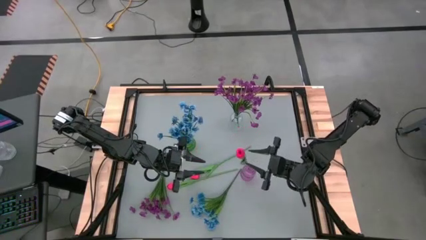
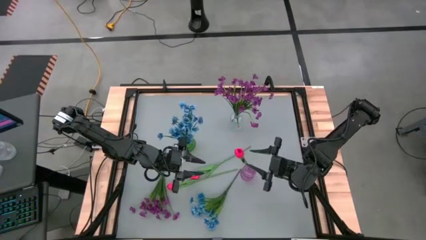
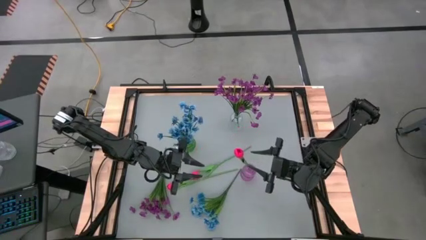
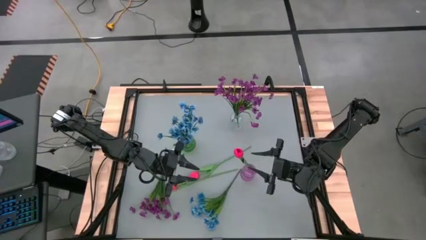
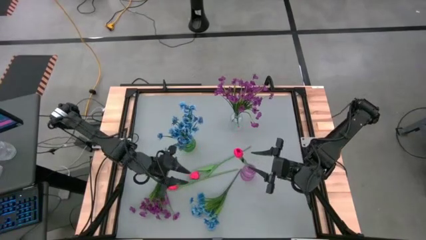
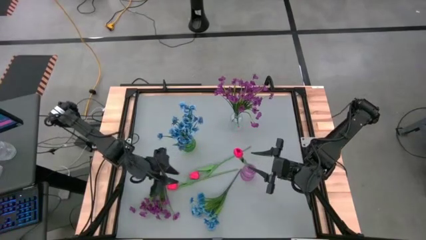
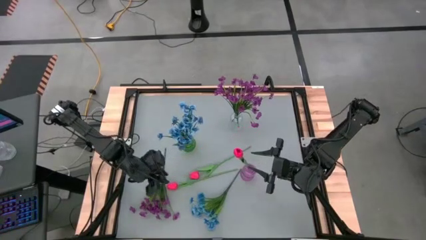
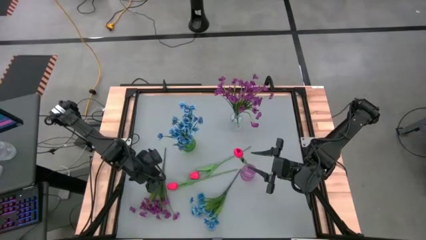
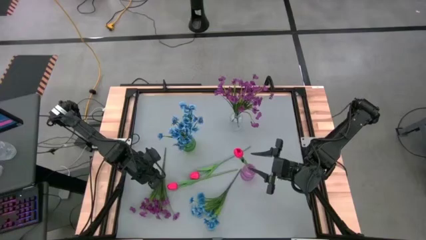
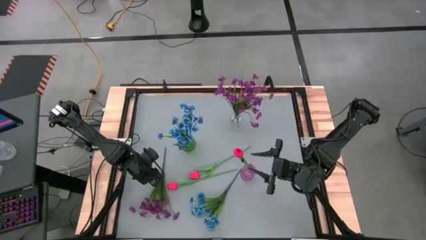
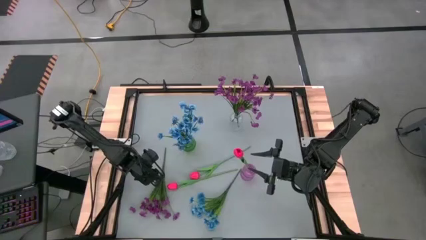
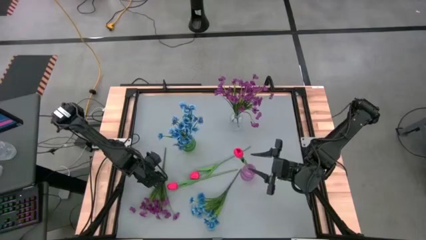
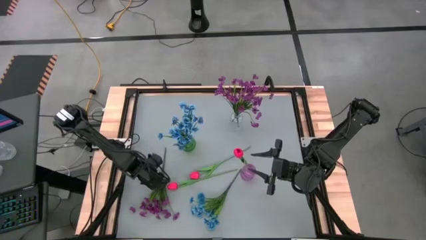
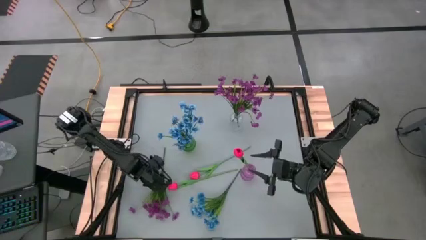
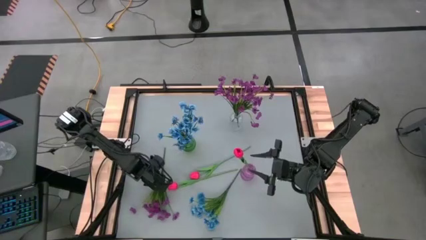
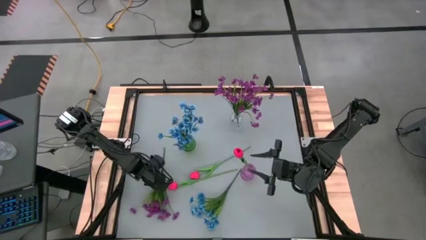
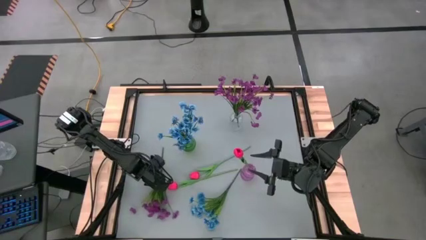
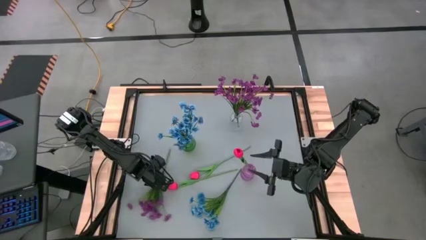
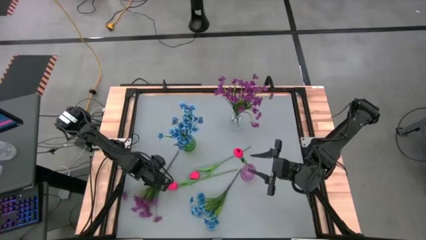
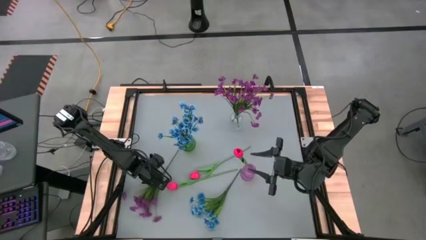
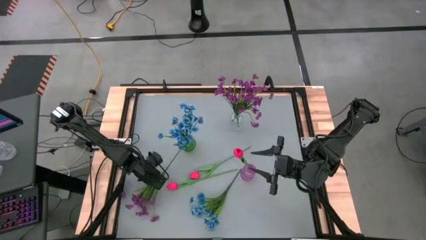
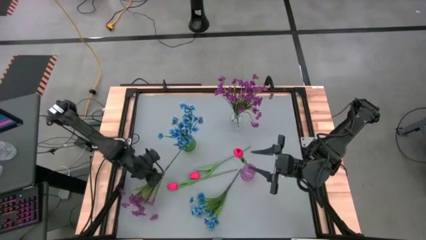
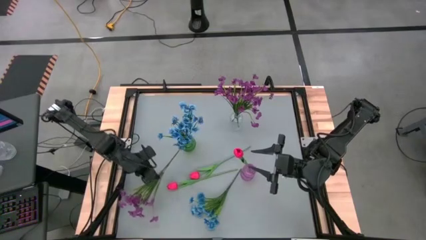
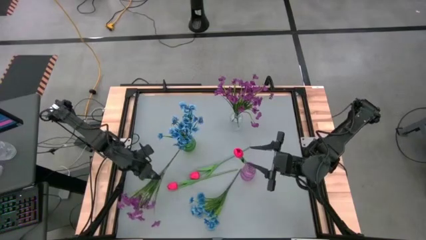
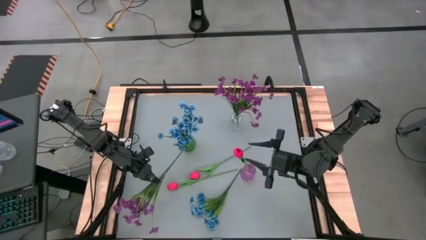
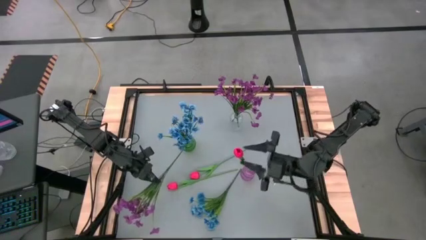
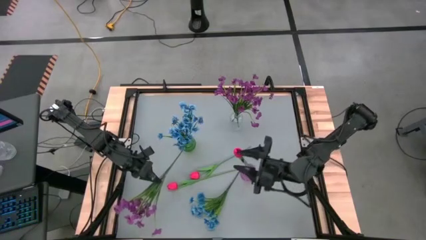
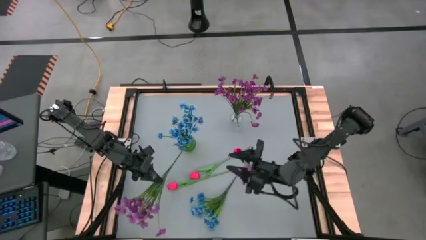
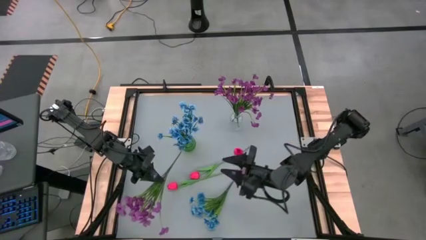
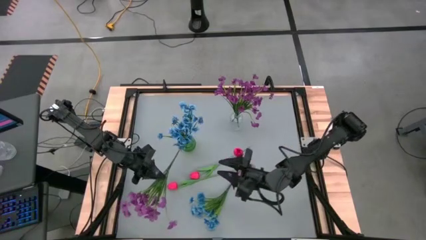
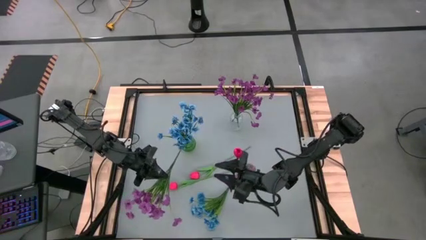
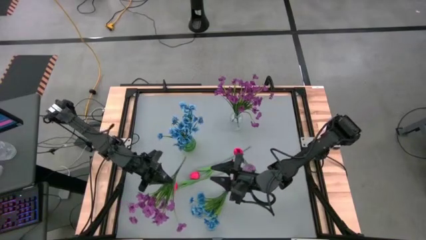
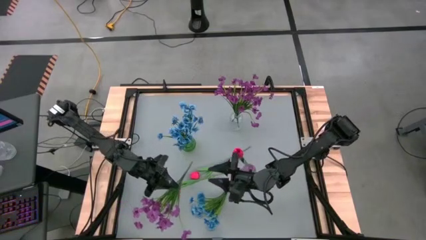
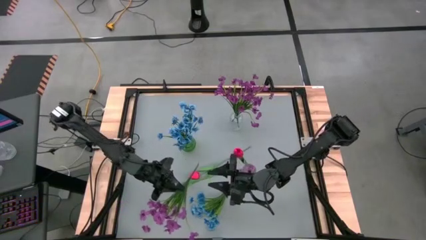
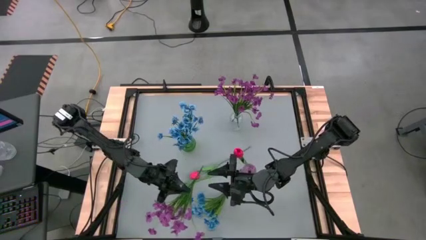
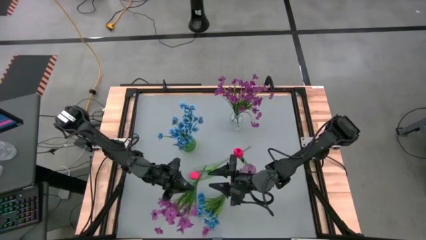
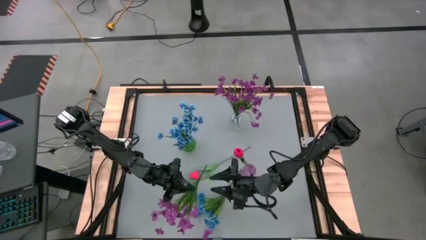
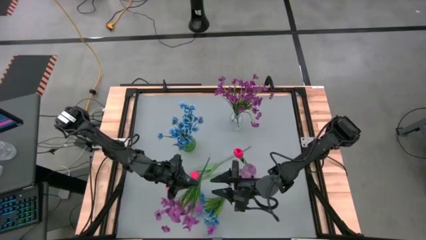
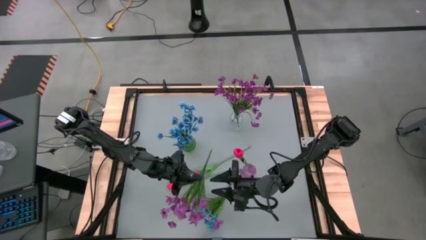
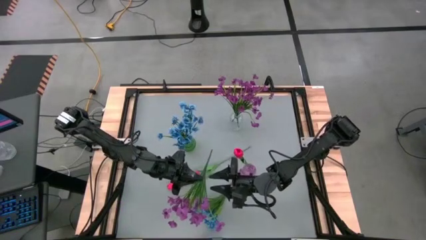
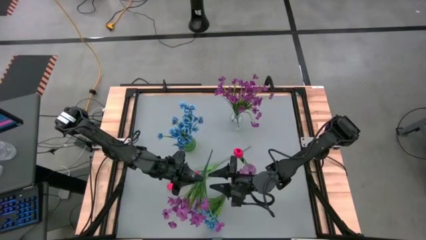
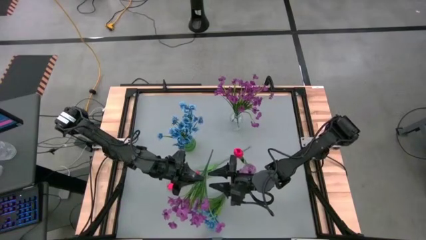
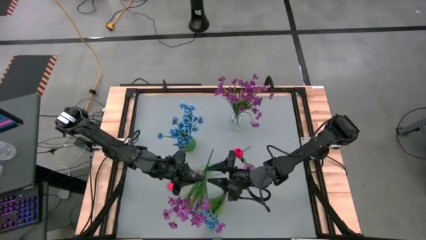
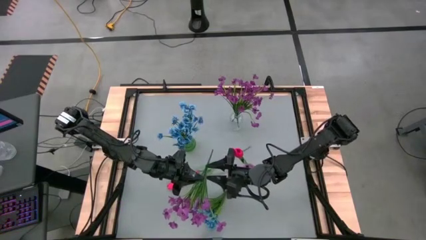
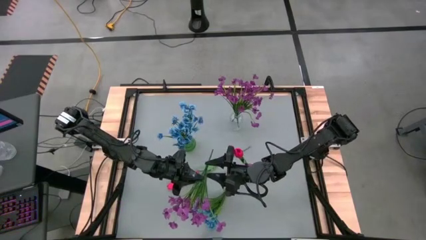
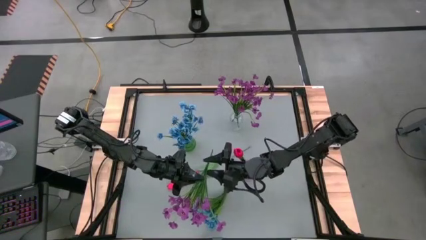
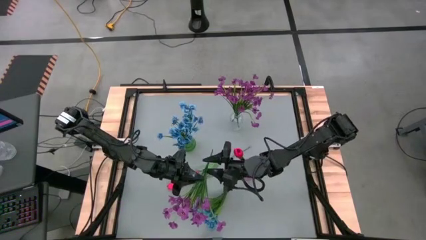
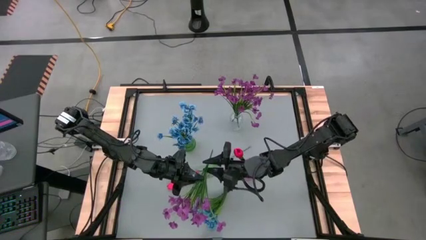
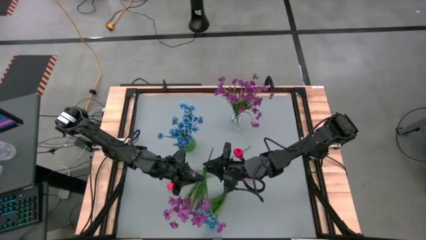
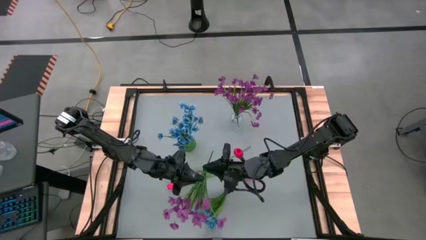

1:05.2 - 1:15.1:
Task: Sort flowers into vase by color
Put the purple flowers into the transparent flower vase
